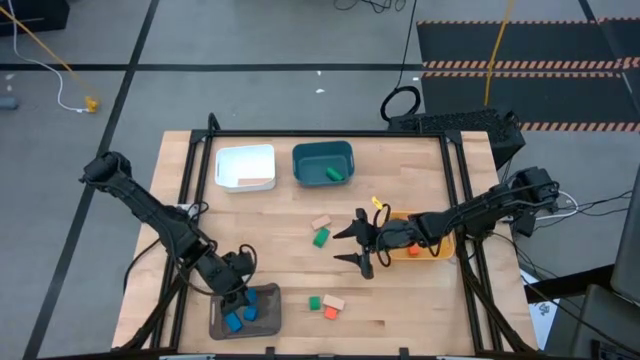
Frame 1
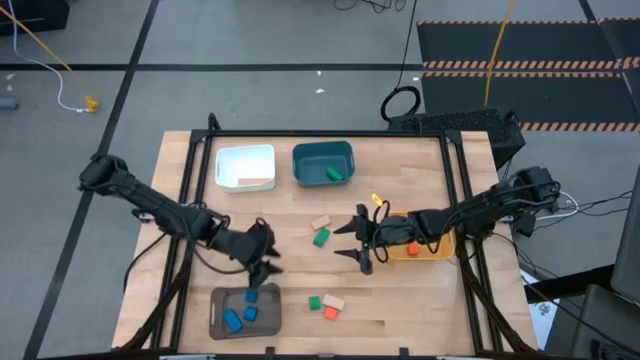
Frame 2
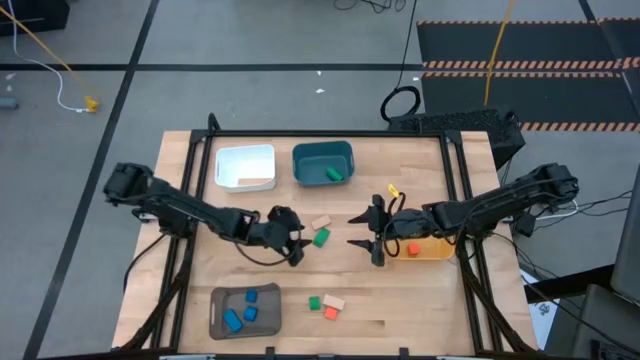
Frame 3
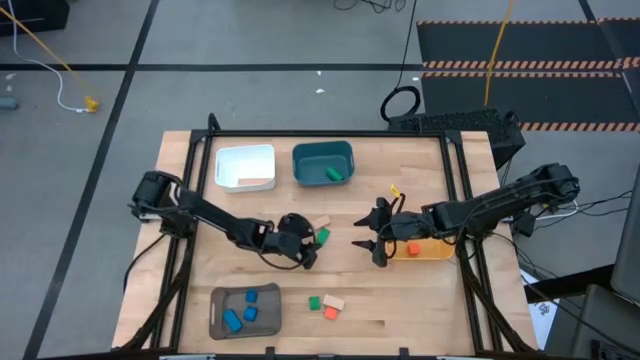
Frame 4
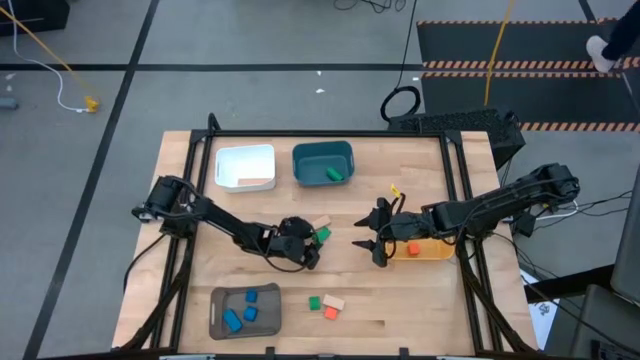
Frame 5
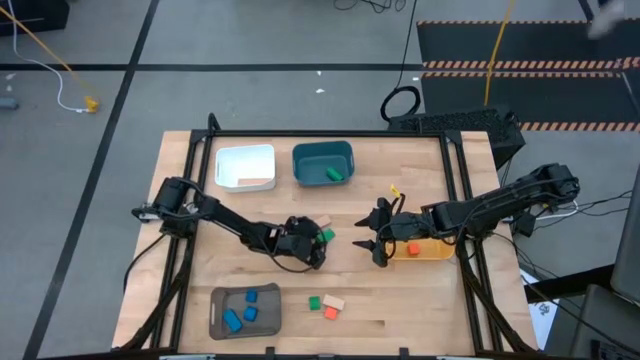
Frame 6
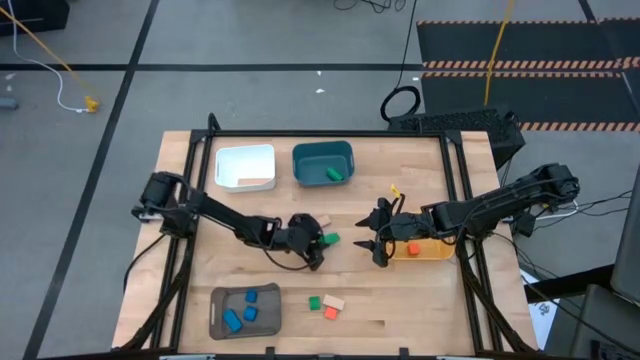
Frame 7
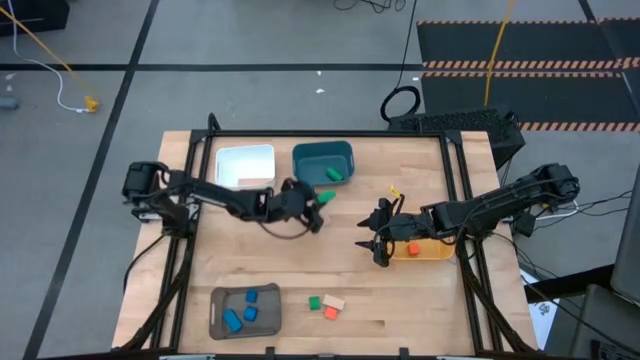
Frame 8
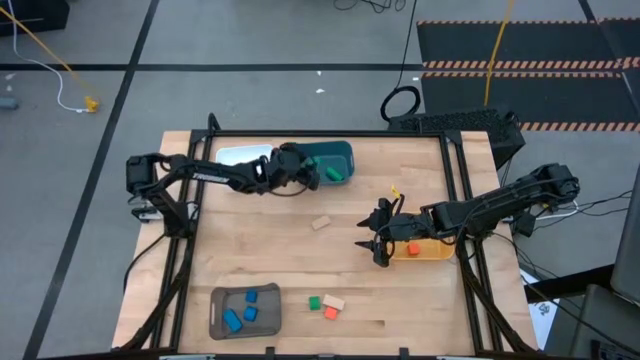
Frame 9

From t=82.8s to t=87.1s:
Task: Sort & place blocks by color
Put the top green block into the blue bin

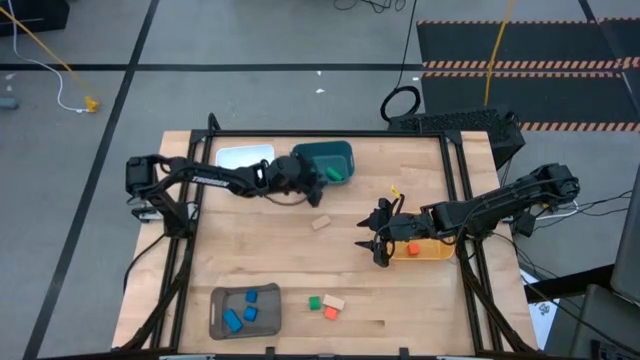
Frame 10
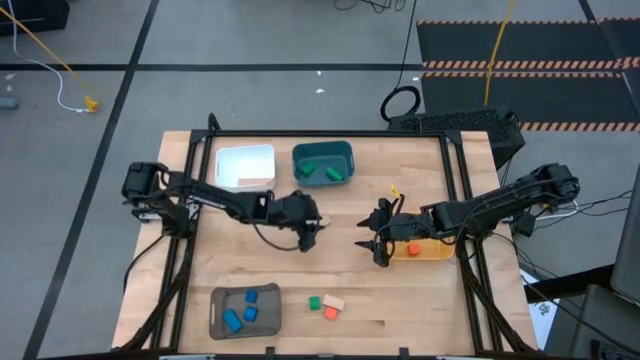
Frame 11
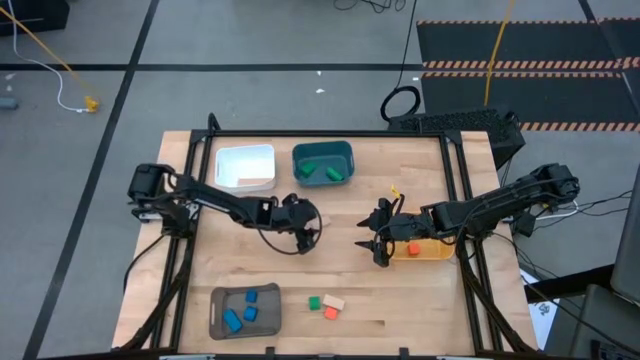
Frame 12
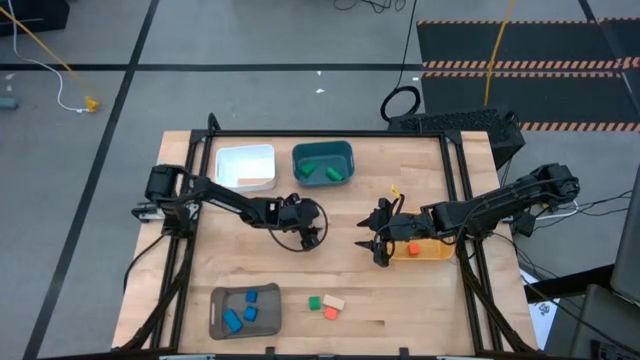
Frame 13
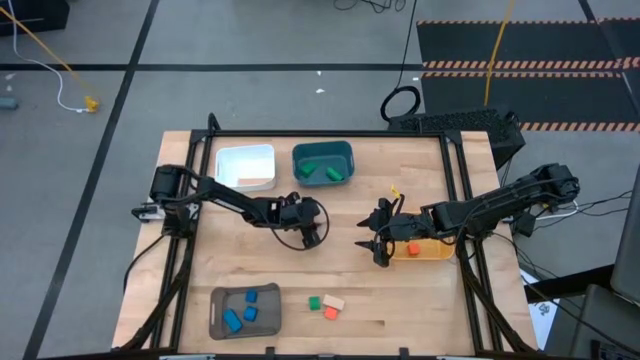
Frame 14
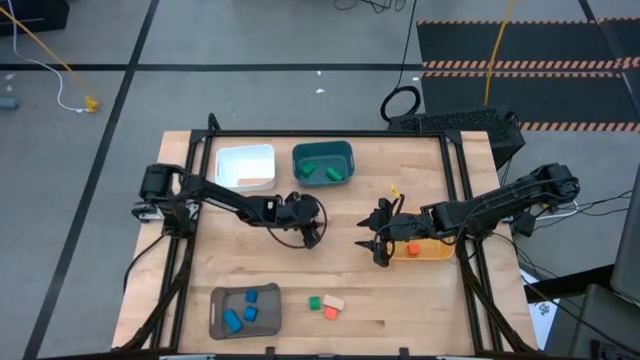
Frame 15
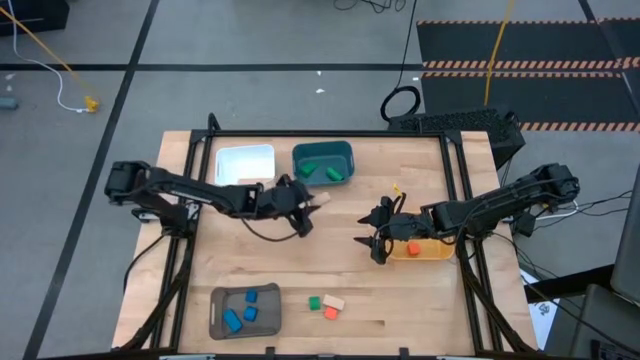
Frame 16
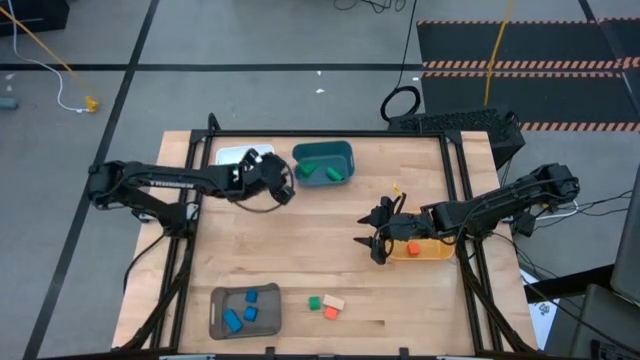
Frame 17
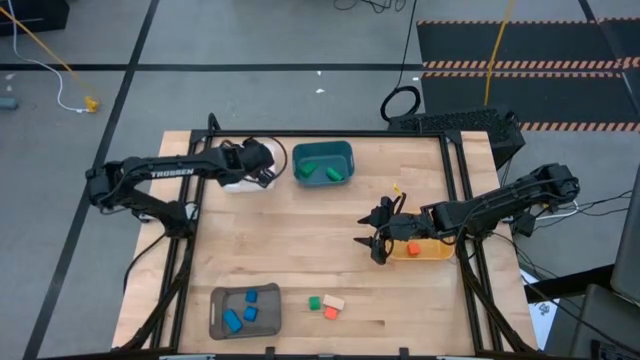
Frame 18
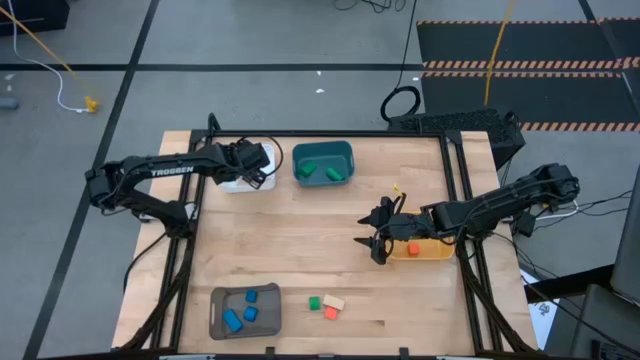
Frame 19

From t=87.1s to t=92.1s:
Put the top brown block into the white bin

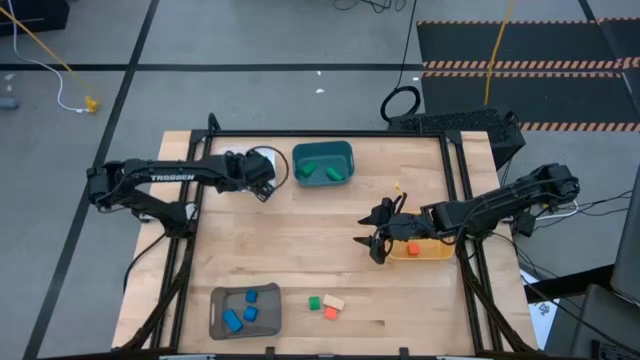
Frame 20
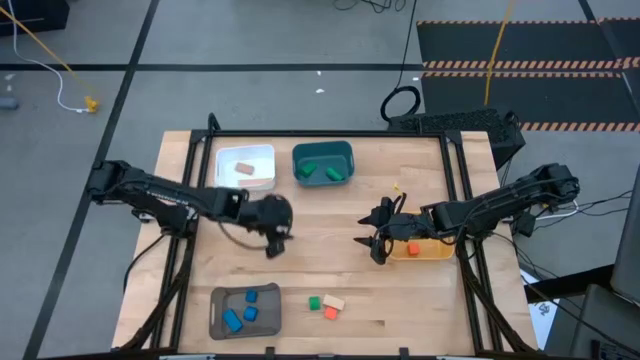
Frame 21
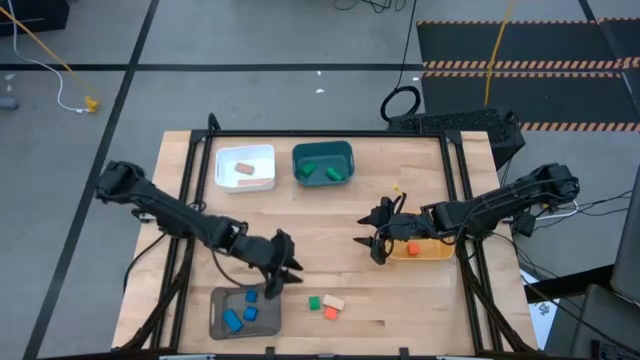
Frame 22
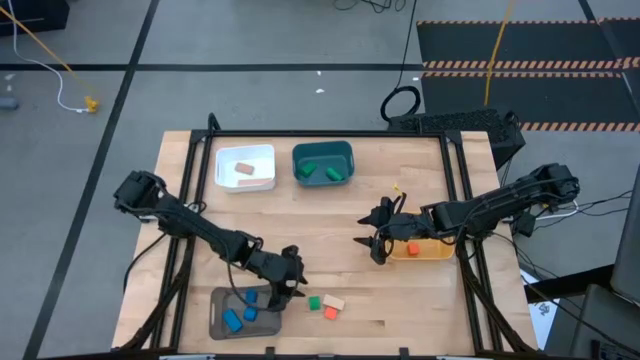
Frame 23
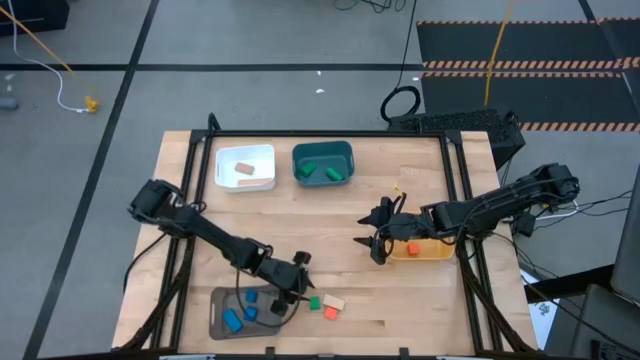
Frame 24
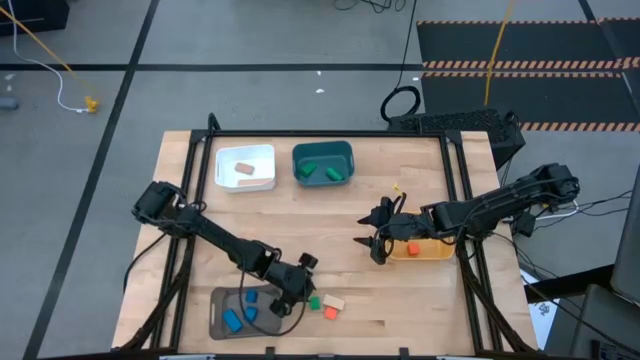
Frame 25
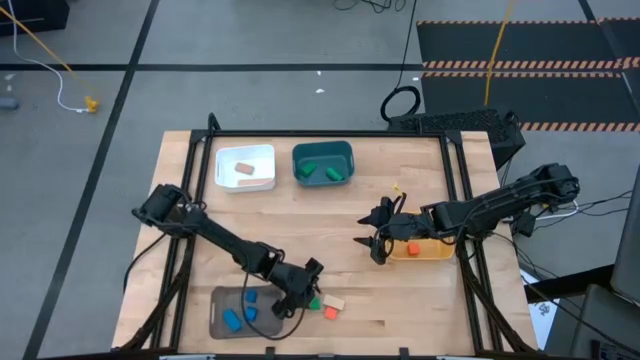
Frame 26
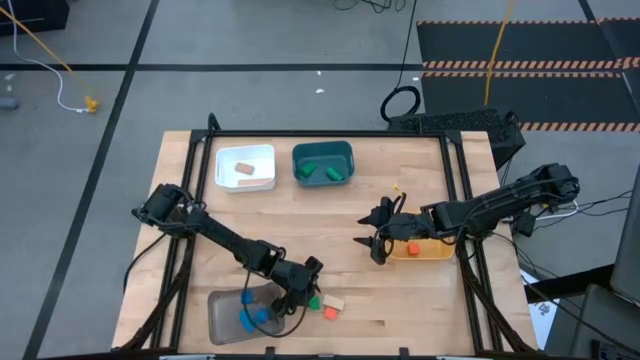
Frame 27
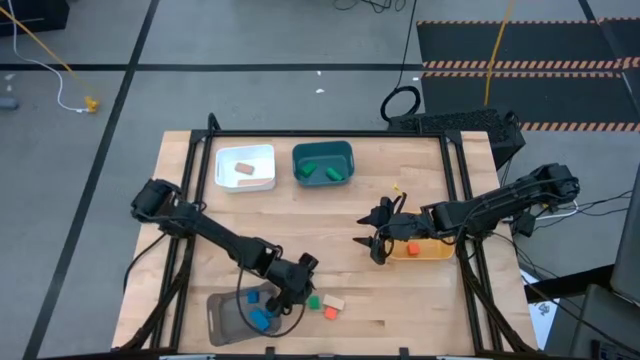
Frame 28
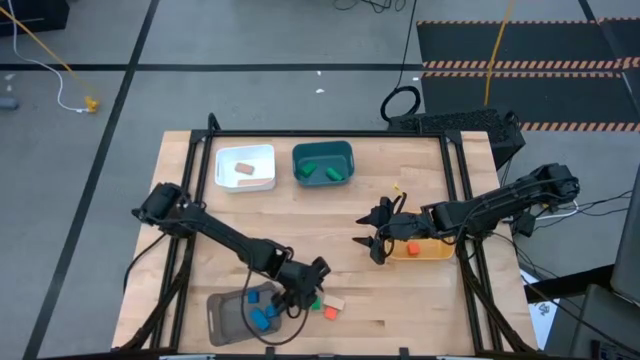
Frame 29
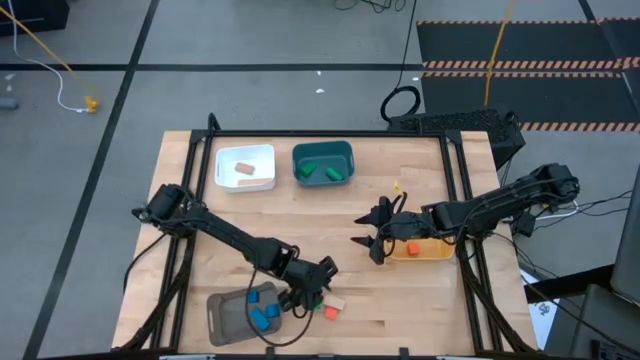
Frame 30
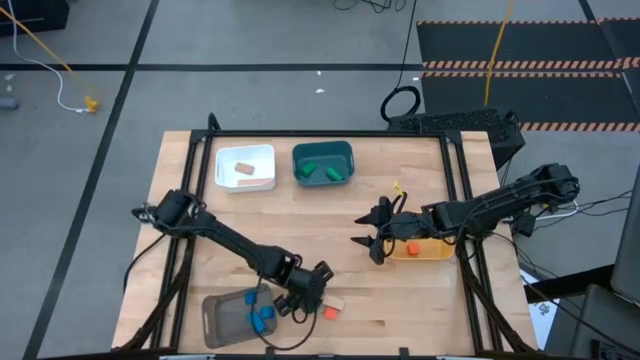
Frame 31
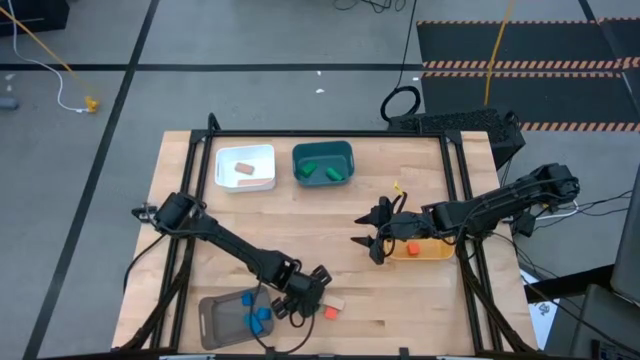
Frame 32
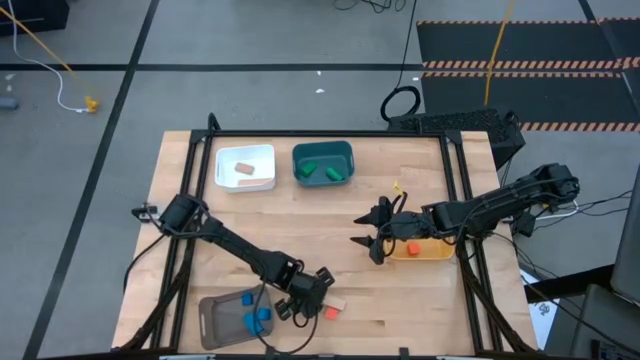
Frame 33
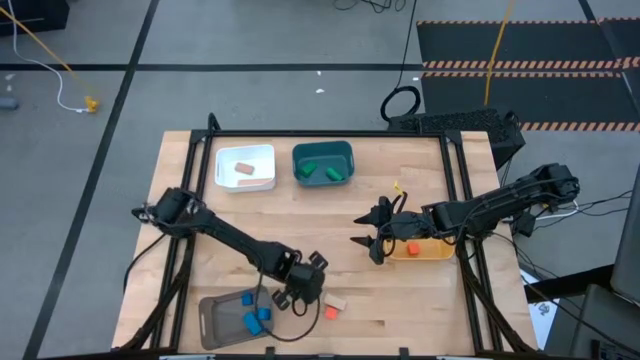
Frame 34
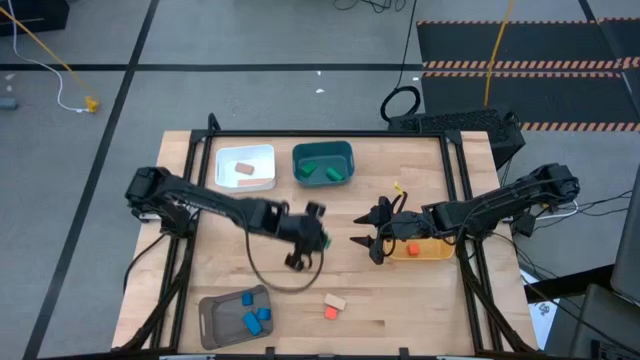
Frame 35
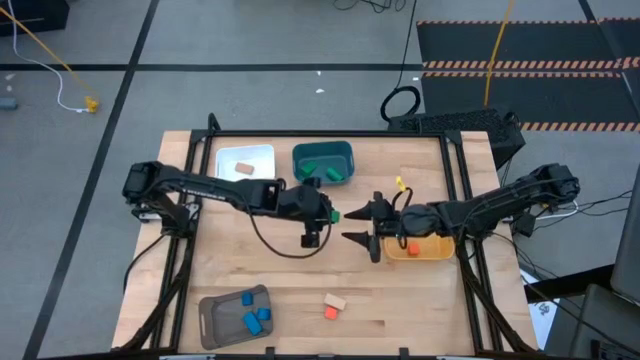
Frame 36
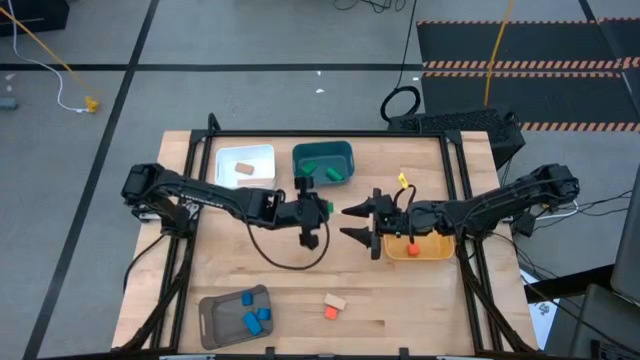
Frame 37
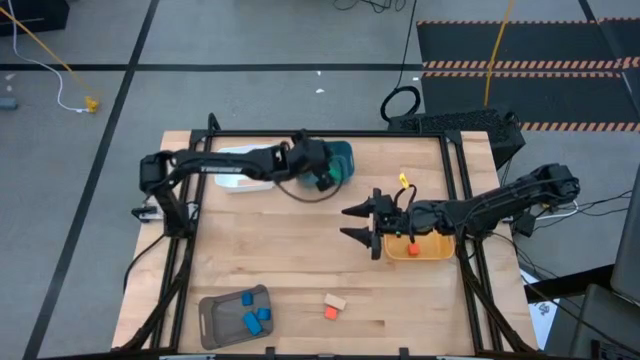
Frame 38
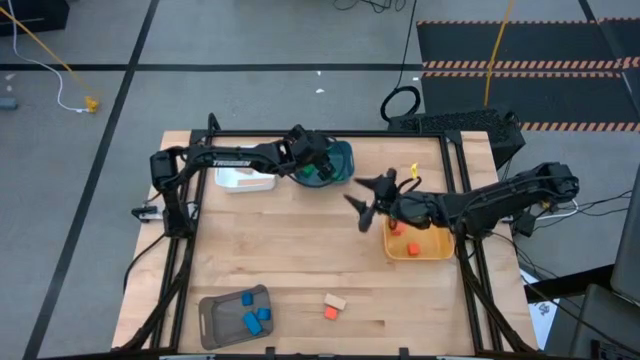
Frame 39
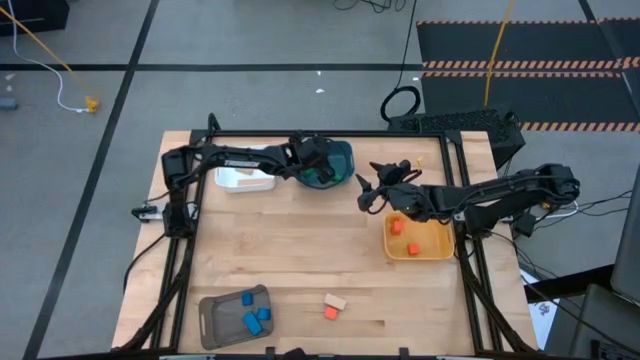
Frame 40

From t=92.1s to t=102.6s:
Put the green block into the blue bin
